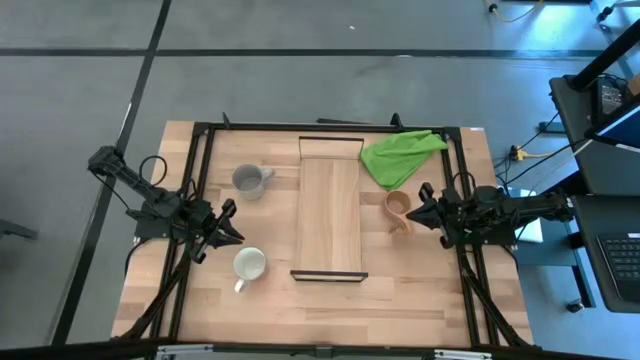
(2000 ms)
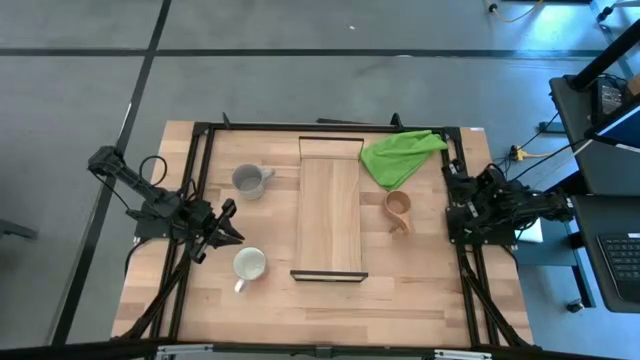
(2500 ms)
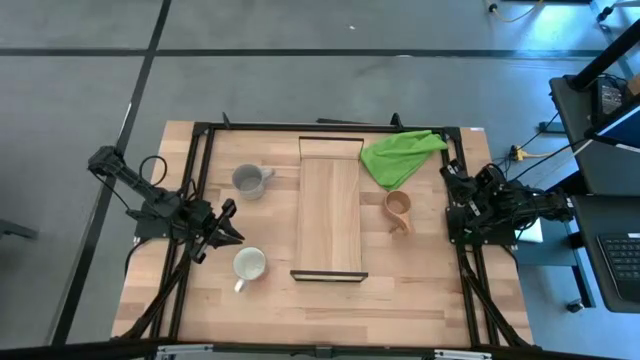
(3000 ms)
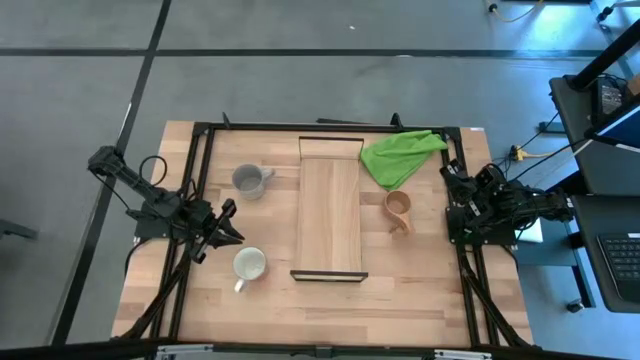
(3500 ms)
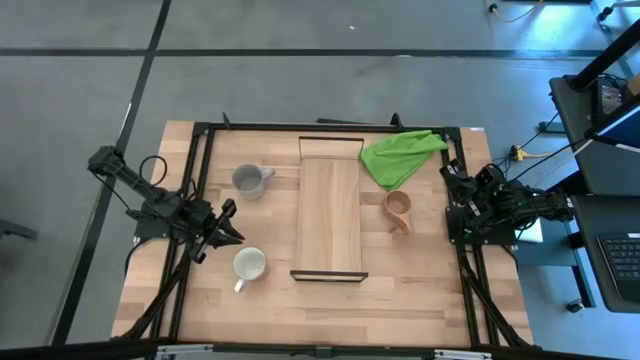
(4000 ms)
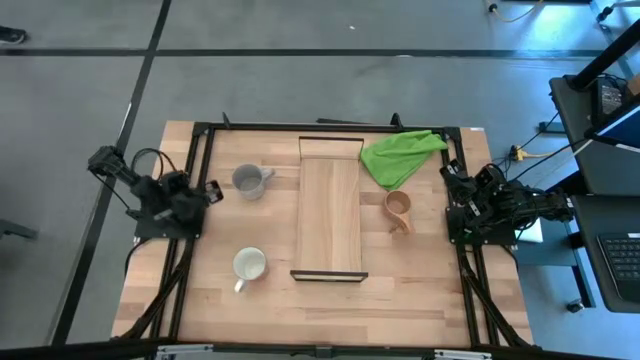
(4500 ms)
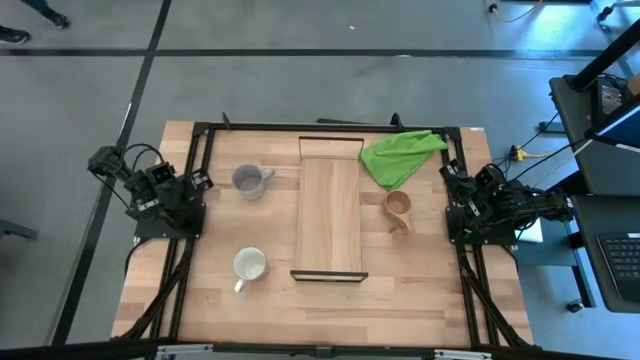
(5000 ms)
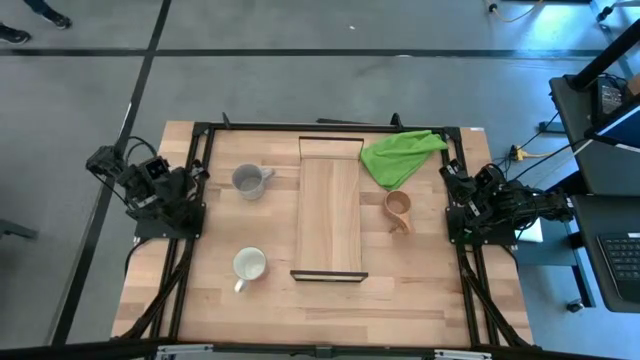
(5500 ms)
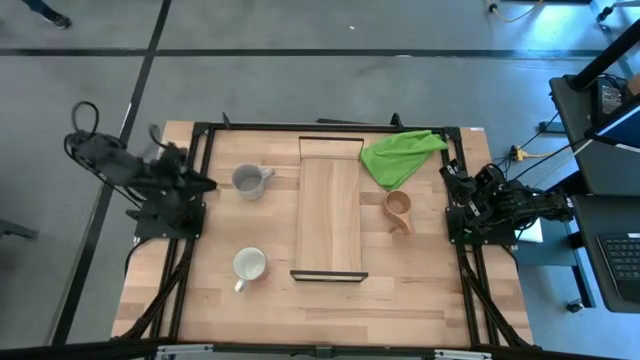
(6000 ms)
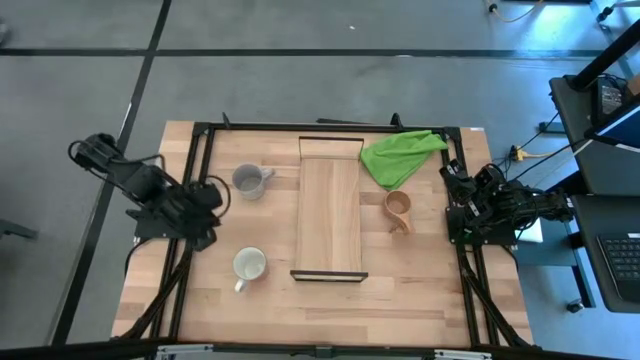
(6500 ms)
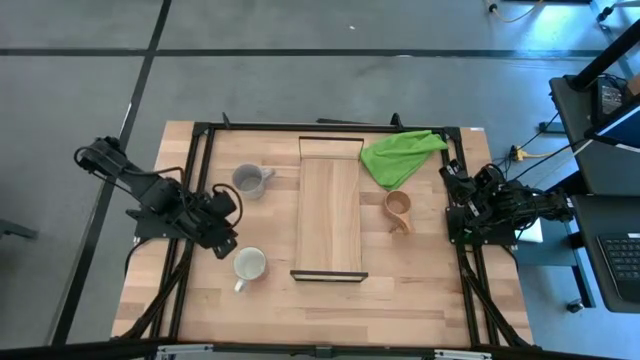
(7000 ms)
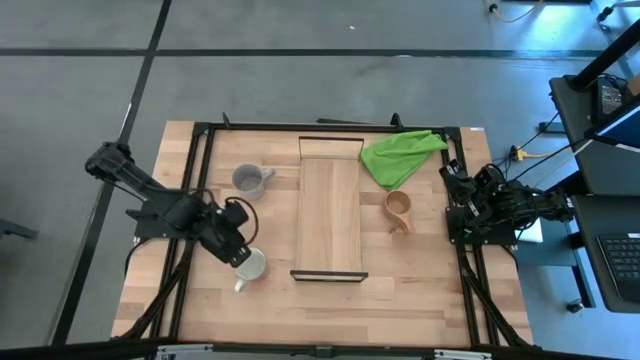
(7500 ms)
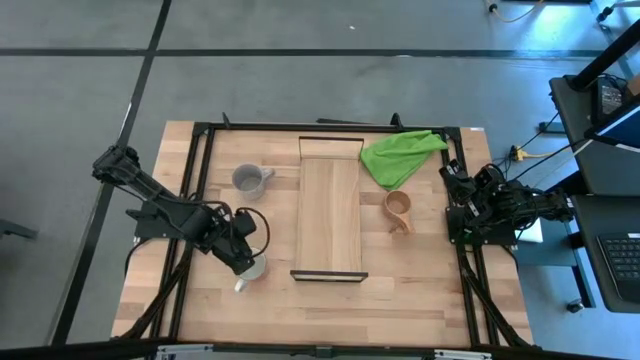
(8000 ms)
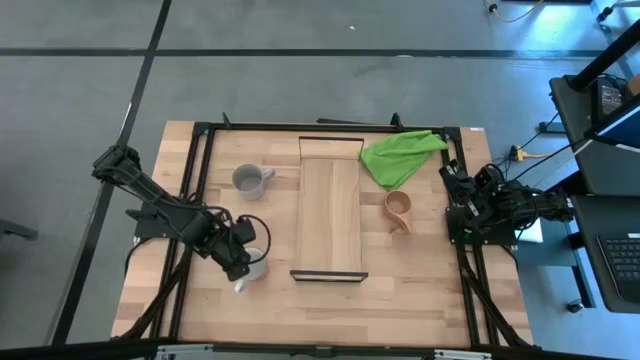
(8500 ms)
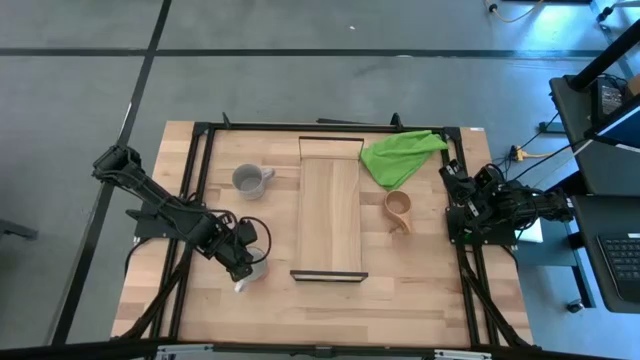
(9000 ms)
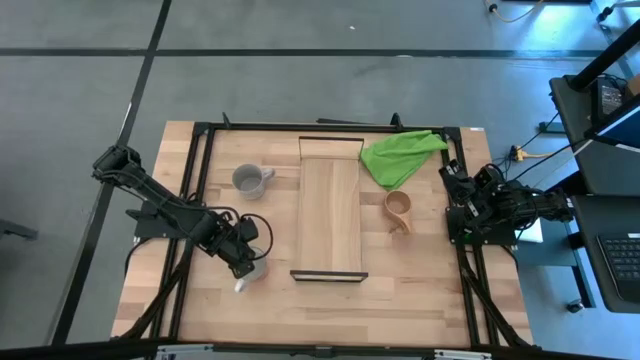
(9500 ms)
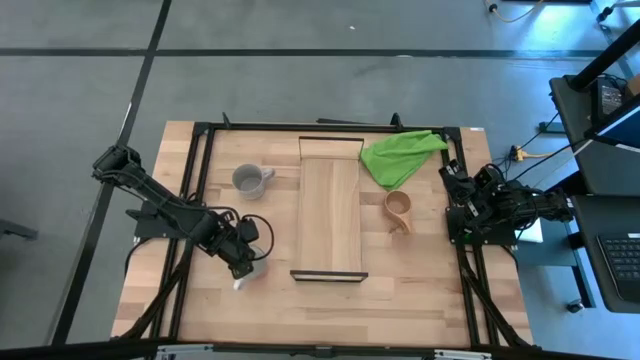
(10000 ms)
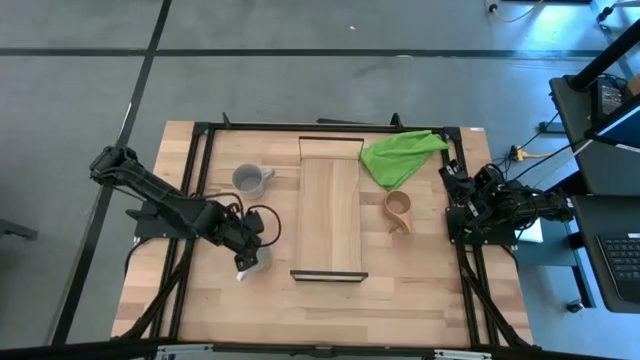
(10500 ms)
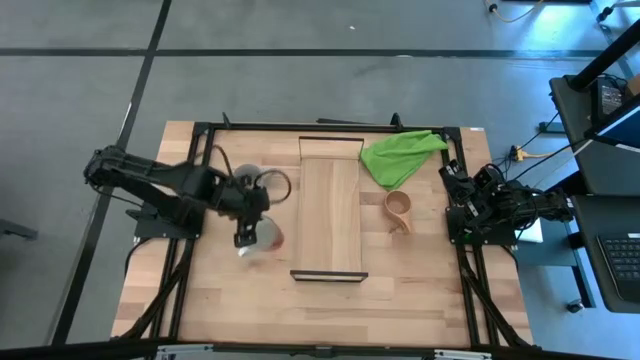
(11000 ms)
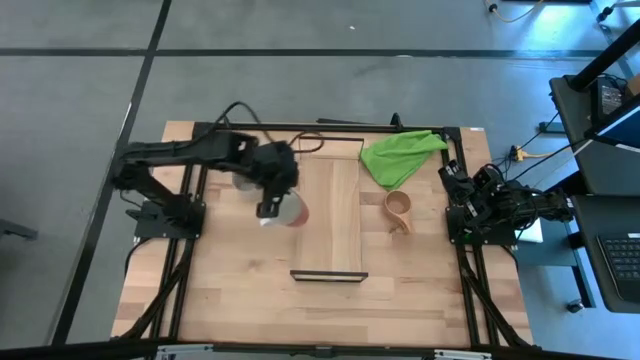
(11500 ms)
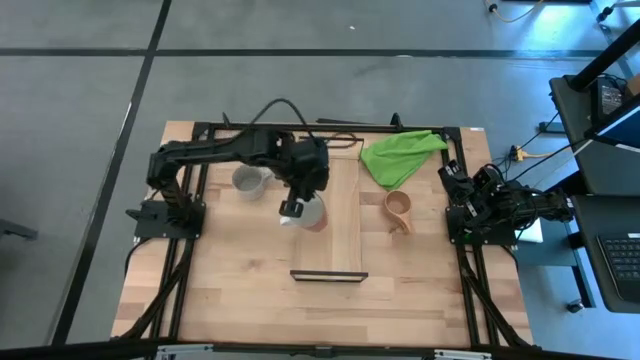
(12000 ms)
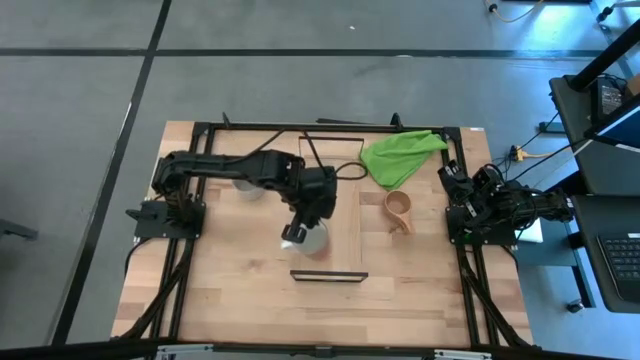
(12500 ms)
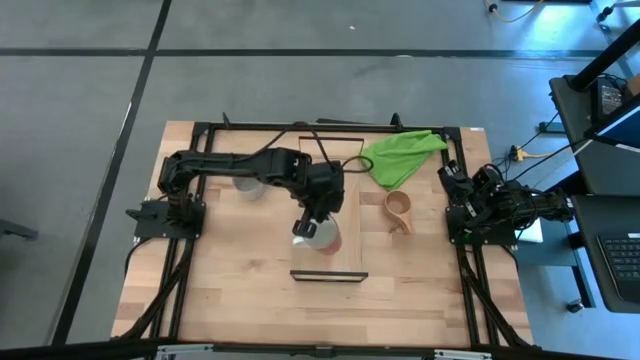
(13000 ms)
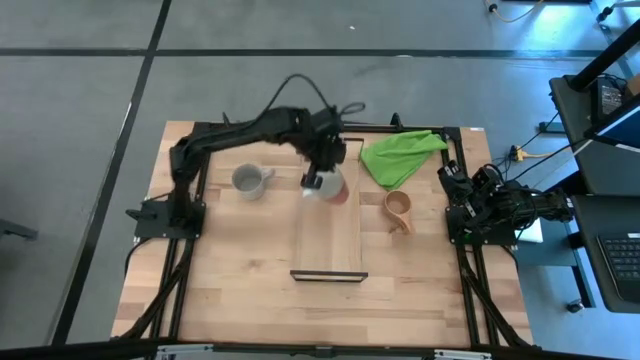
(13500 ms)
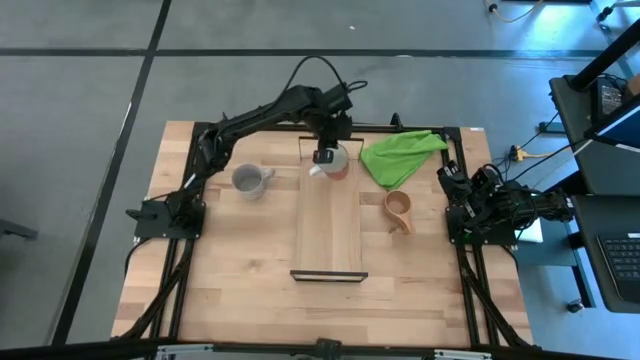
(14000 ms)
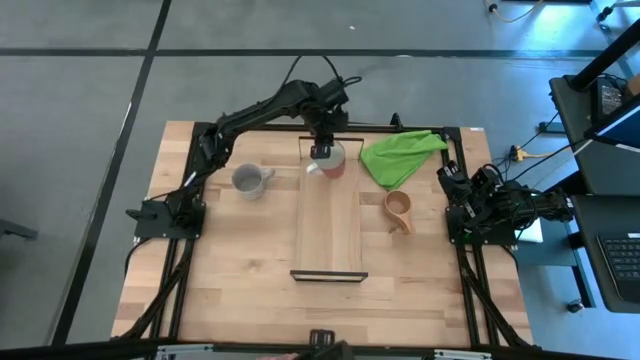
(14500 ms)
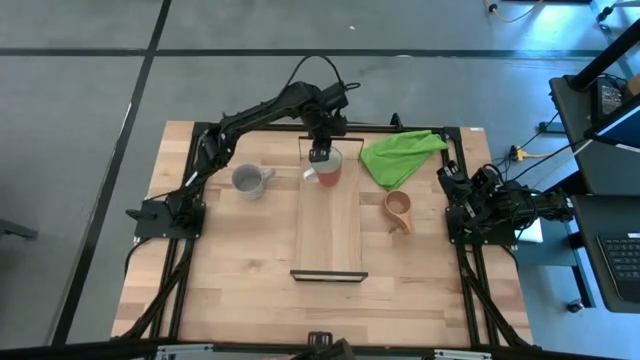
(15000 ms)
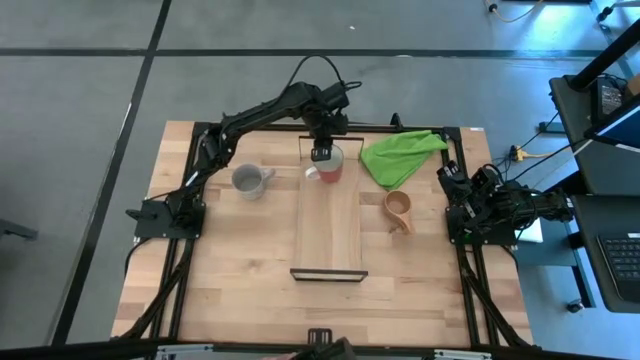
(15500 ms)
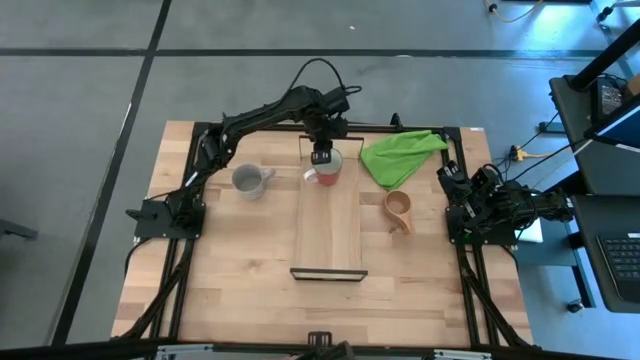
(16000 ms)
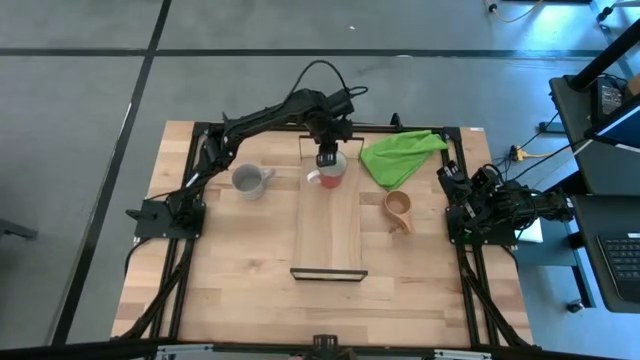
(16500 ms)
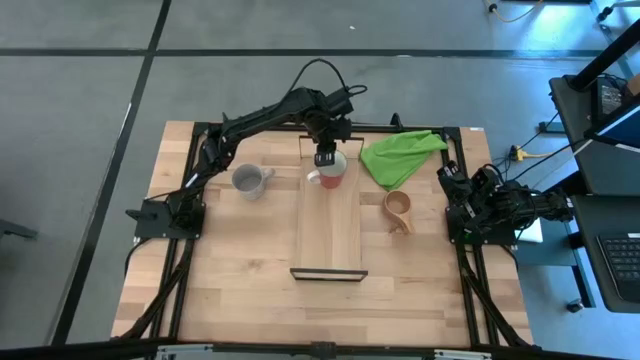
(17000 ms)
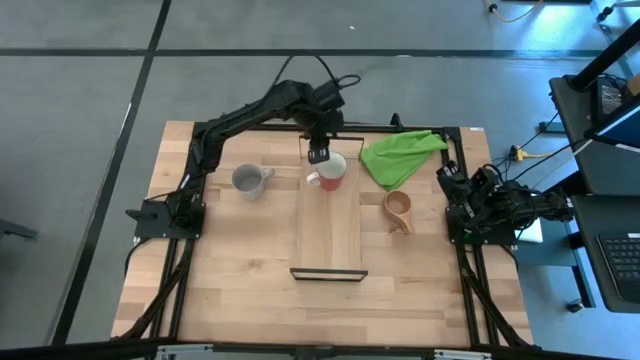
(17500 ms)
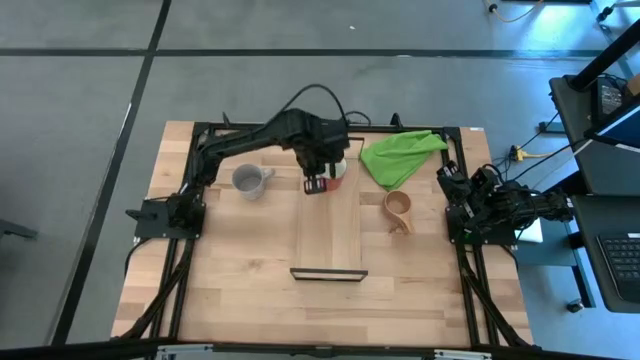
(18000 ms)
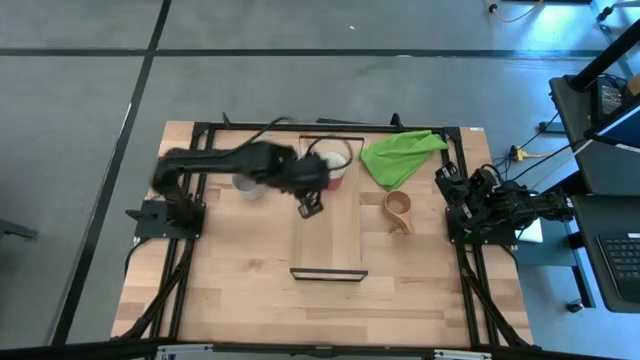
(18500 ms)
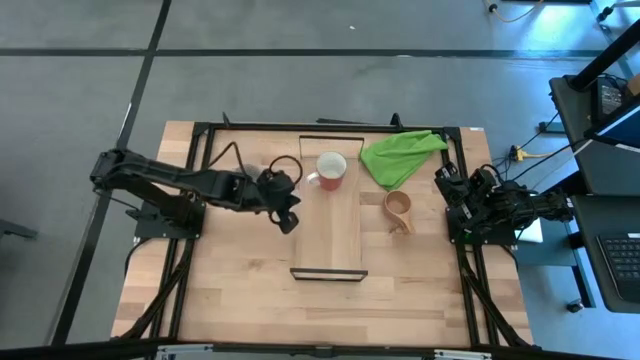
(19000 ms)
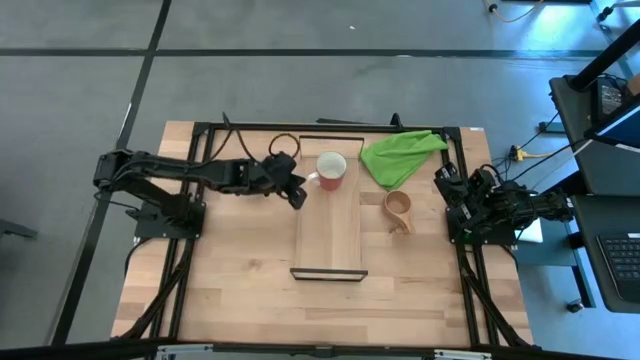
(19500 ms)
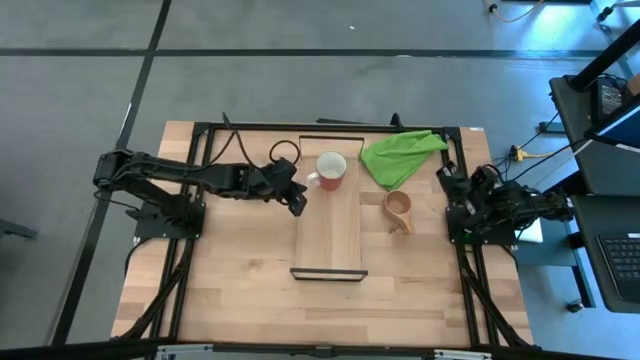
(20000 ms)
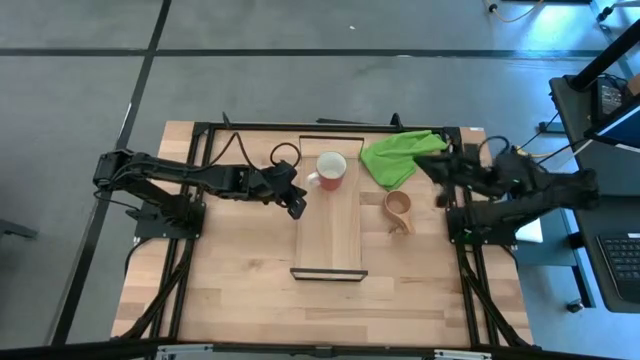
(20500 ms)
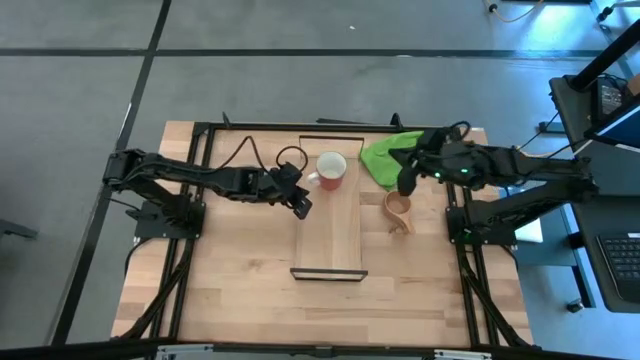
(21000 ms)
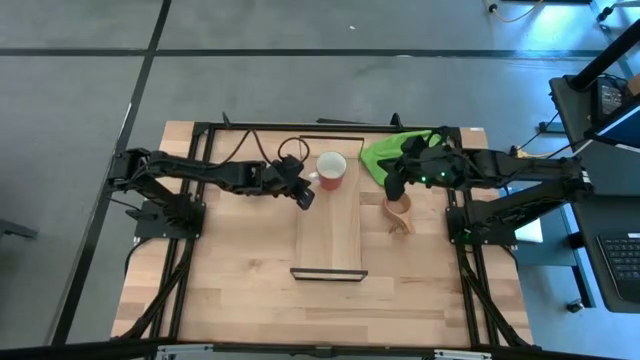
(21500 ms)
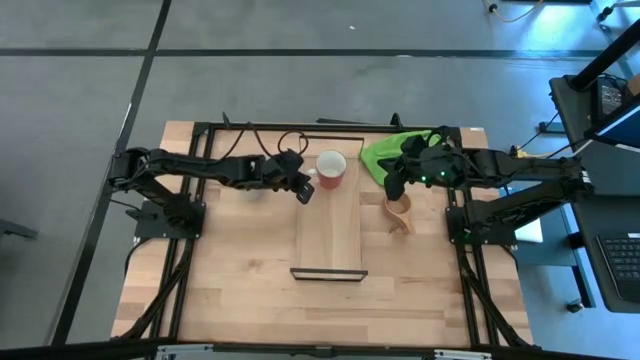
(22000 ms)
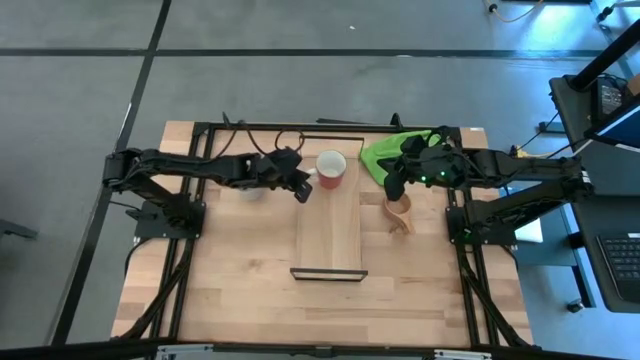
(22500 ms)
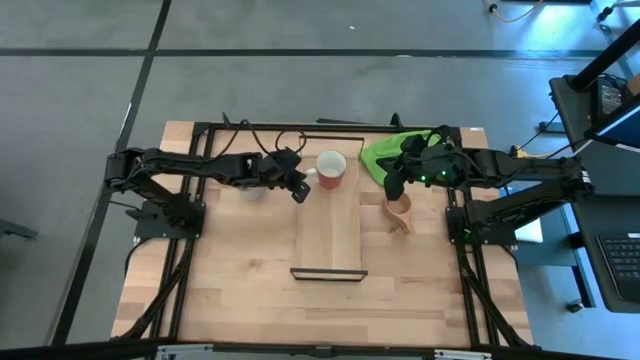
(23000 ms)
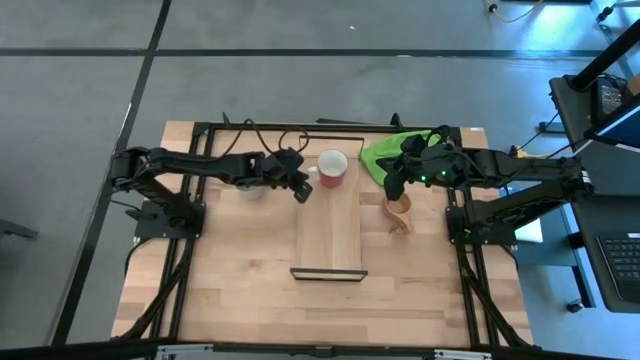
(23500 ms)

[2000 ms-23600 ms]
Task: Stack small to large cups/mugs on shelf
Put the orange mug on the shelf
